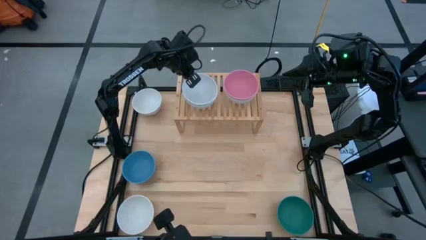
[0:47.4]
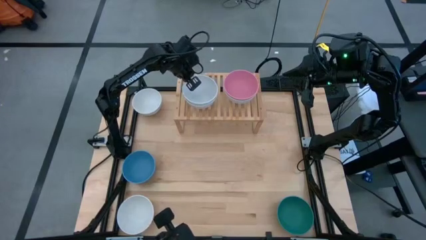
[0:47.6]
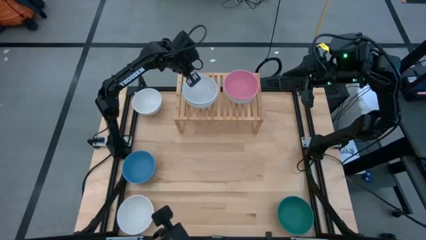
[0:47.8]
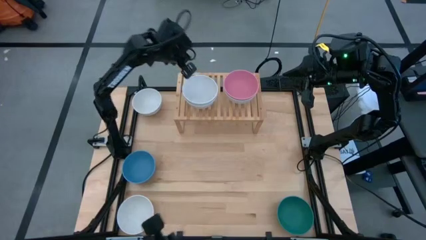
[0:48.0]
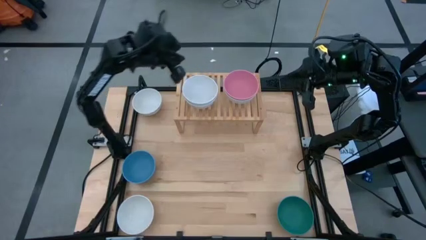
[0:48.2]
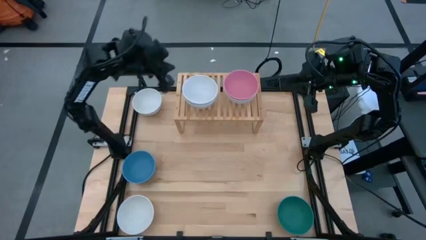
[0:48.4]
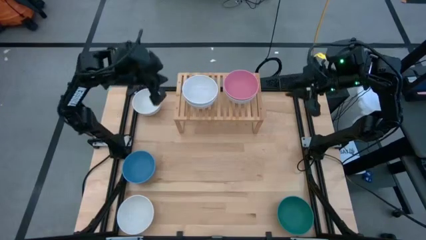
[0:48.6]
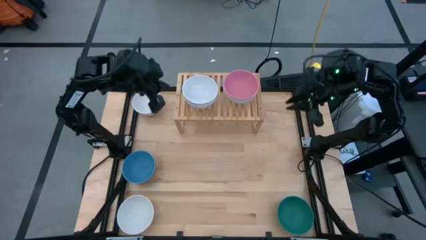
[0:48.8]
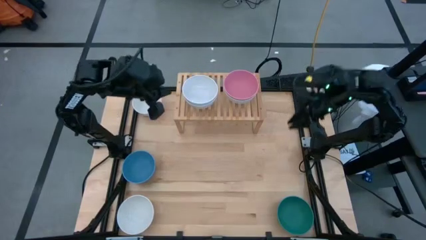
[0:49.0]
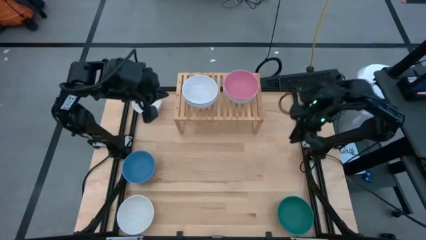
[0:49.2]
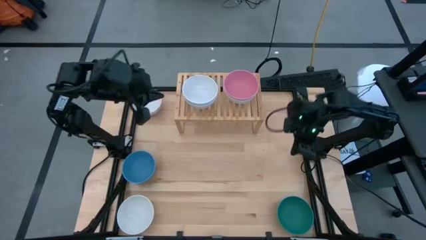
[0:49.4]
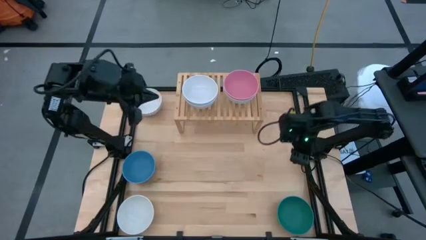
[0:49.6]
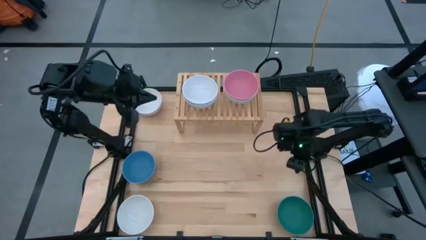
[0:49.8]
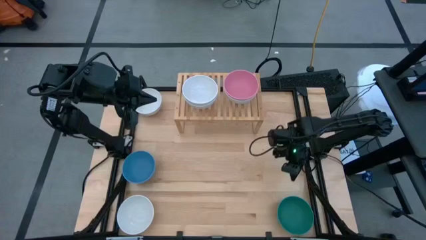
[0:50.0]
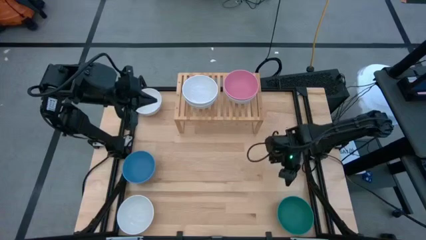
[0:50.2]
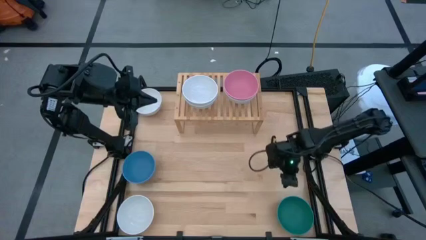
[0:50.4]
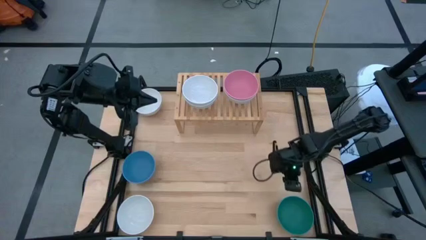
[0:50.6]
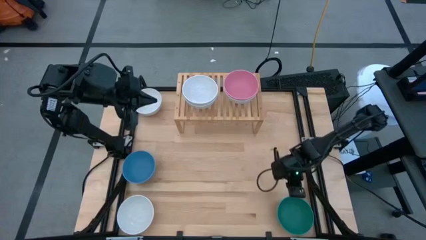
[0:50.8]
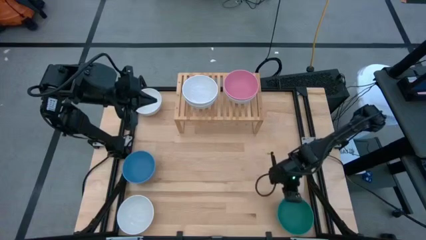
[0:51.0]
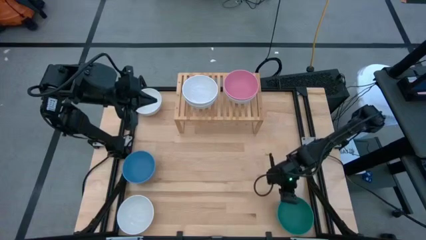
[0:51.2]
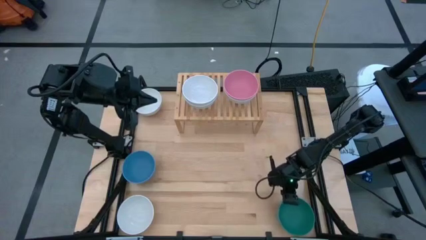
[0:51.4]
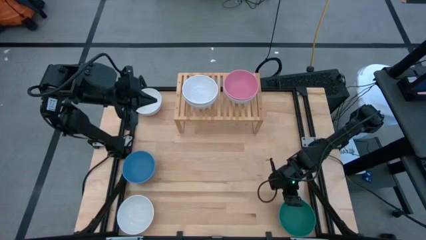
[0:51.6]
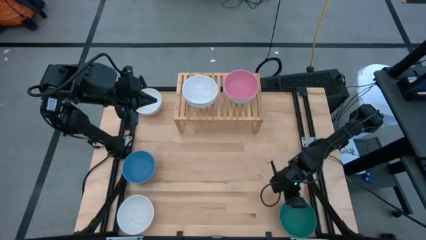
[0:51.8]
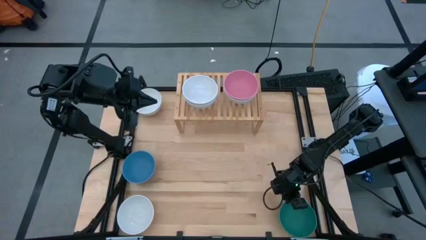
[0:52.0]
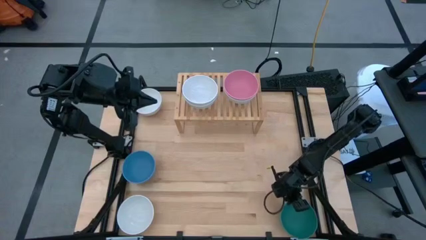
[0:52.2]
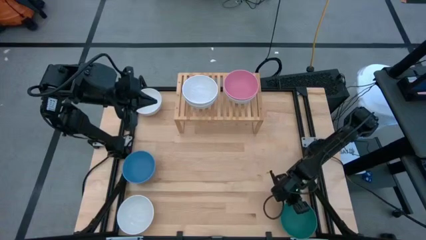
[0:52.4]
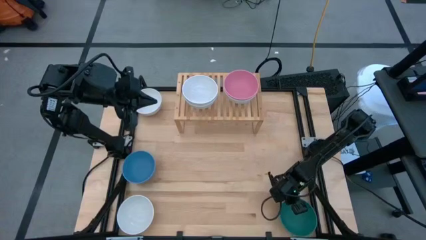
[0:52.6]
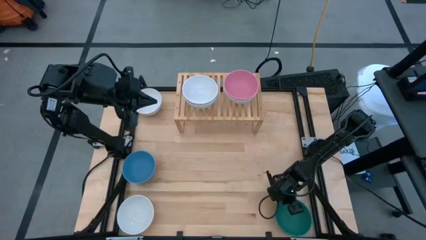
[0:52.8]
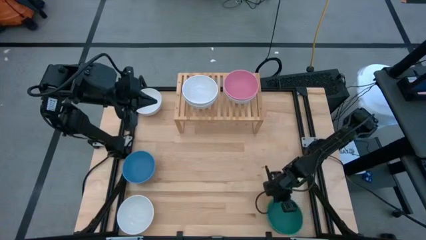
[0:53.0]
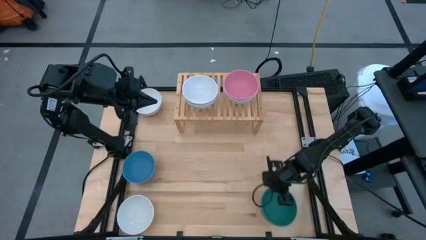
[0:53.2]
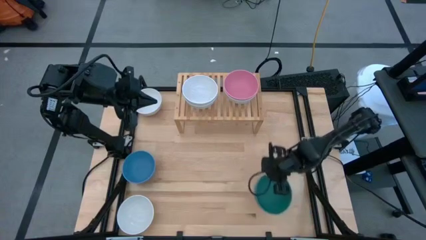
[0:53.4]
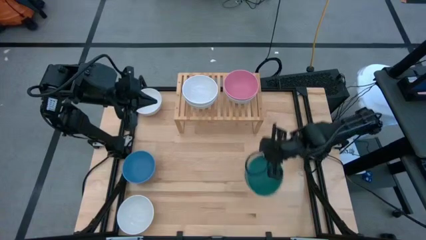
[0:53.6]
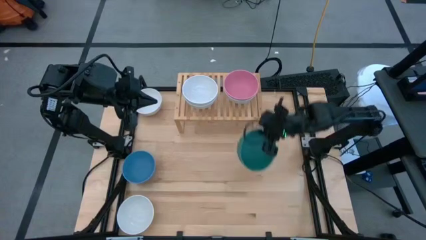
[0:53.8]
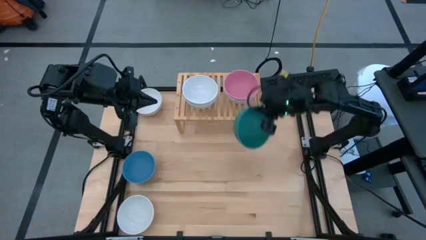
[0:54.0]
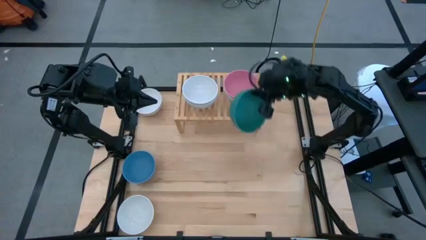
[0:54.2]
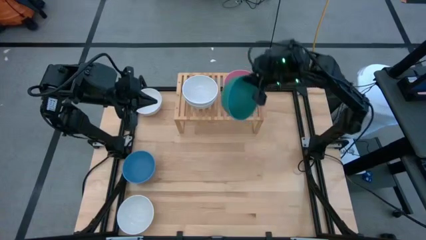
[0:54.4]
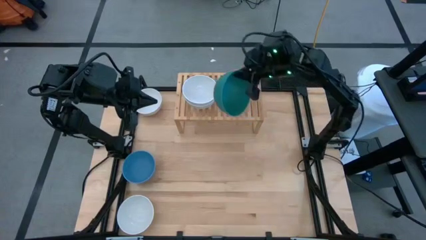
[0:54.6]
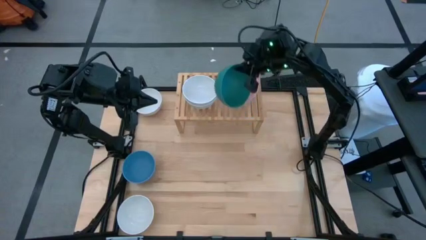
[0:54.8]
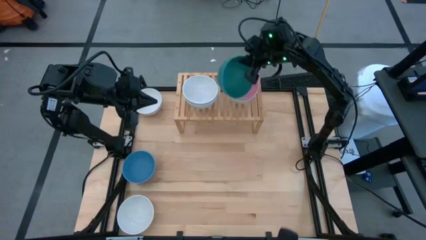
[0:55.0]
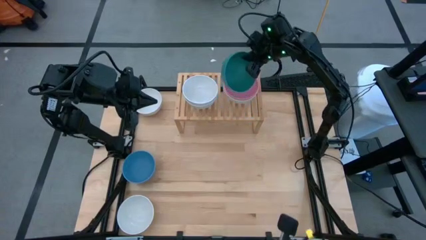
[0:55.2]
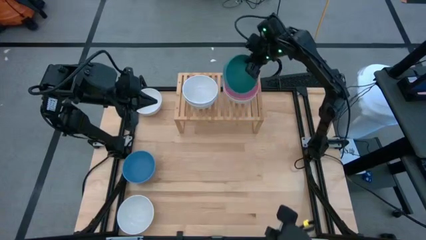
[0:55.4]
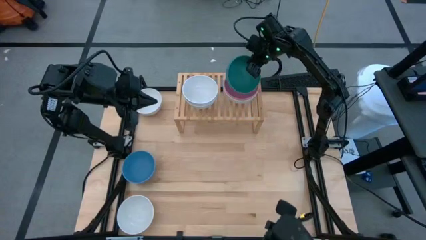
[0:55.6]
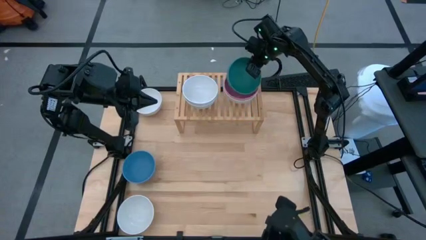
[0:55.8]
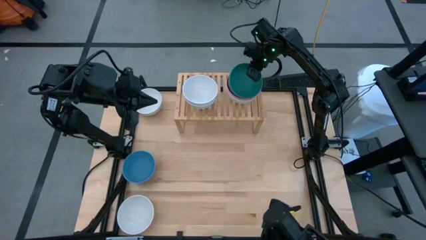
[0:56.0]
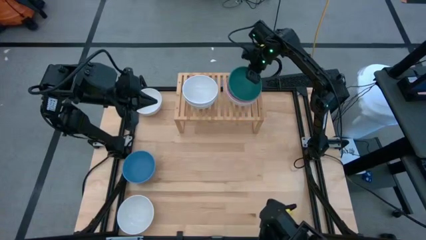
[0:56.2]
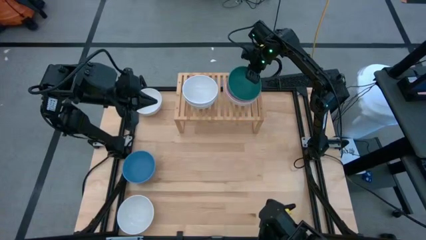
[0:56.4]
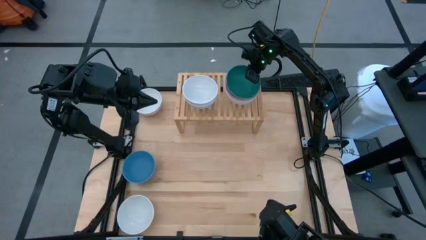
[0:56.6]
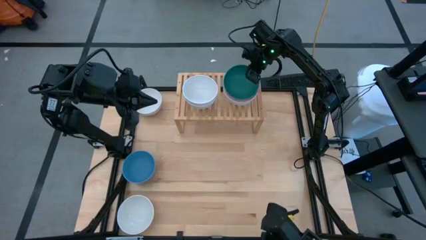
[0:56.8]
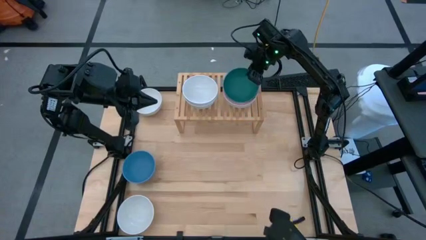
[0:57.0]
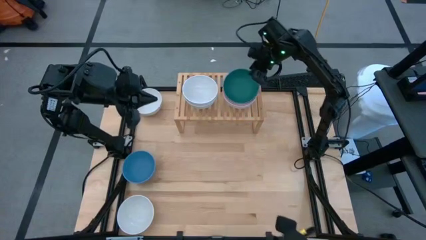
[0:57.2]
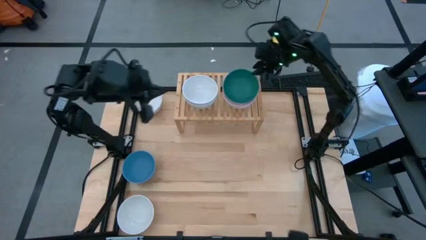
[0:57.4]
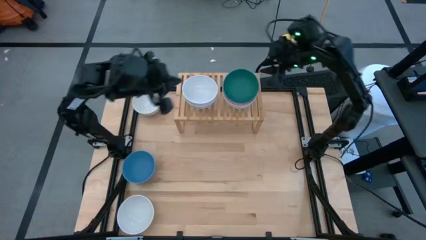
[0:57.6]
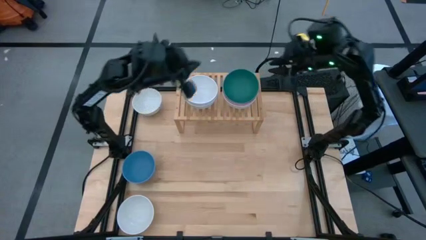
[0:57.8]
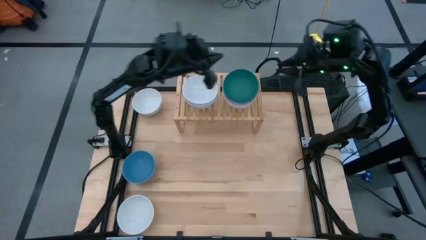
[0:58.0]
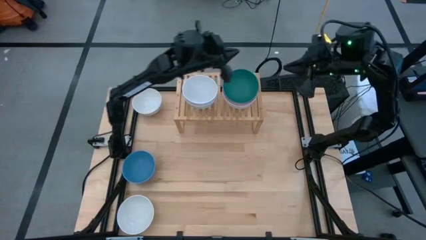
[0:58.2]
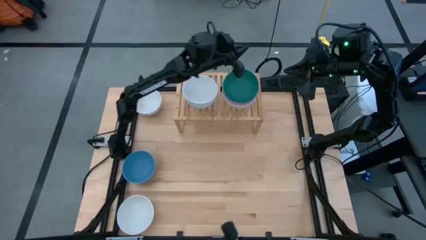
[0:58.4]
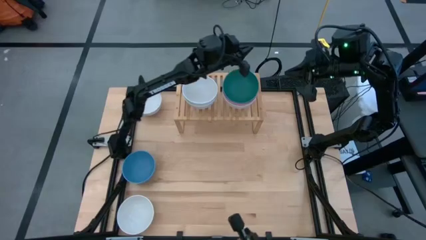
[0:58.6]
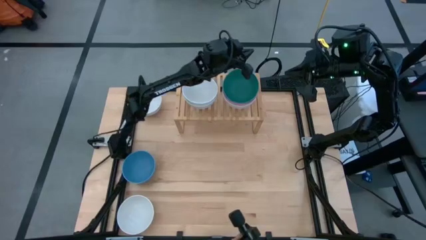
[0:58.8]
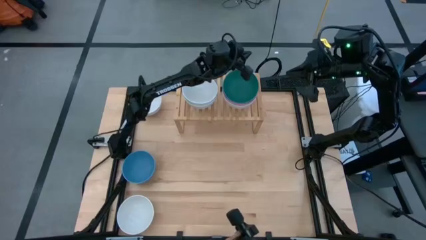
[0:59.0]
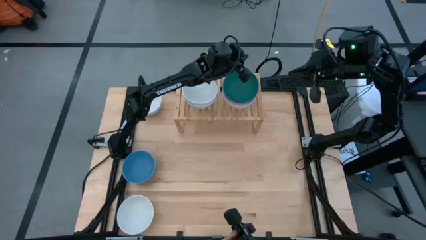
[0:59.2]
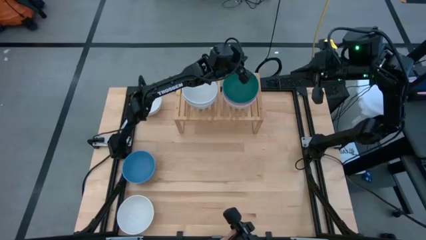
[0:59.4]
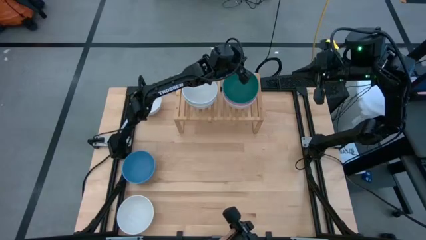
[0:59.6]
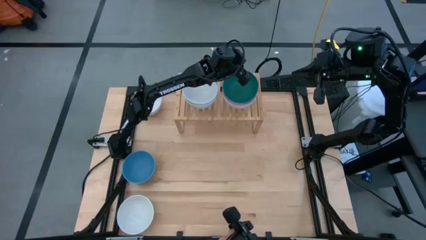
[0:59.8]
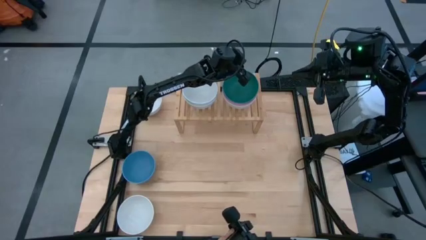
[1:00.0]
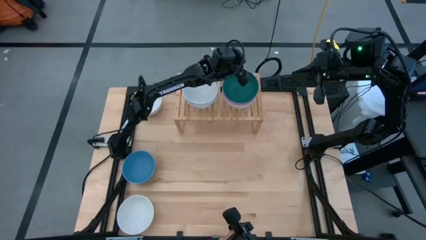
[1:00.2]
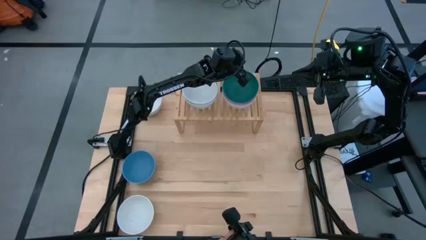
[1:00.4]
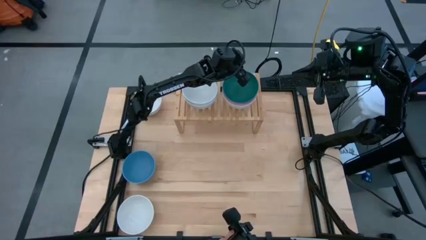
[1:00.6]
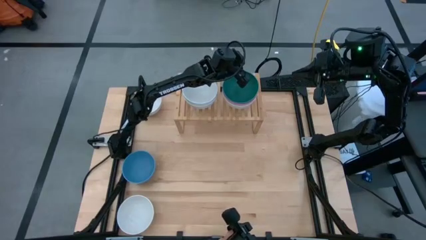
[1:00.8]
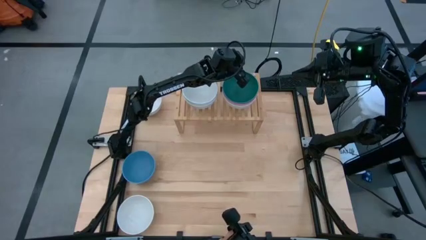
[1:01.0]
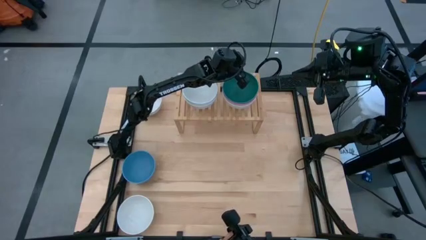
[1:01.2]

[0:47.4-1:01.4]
Task: Place and stack bowls onto a shelf
Stack the green bowl on top of the pink bowl on the shelf
